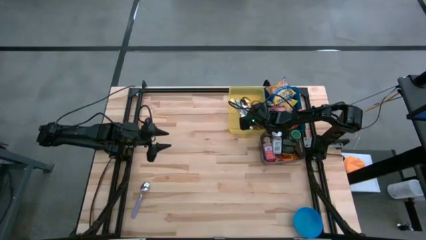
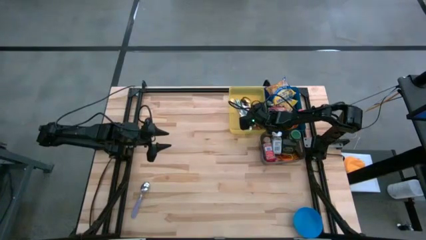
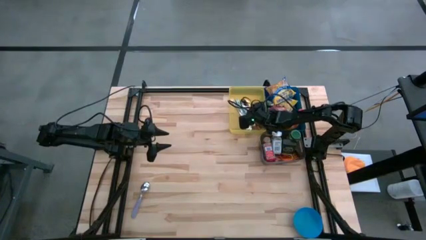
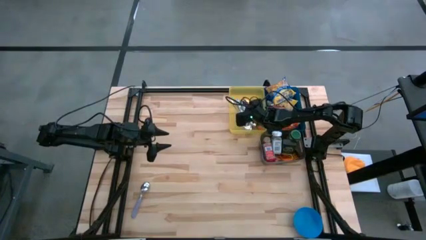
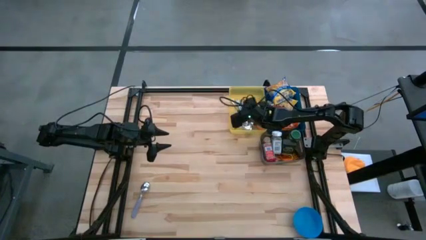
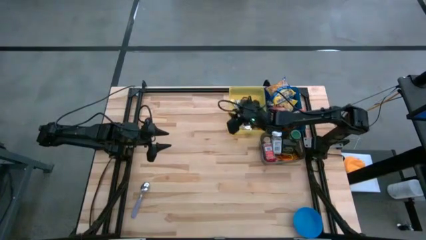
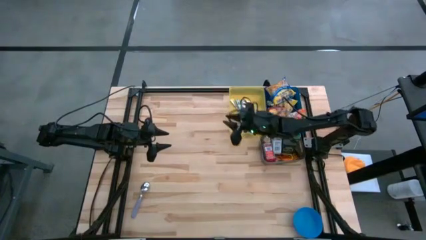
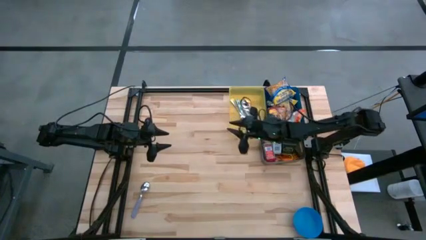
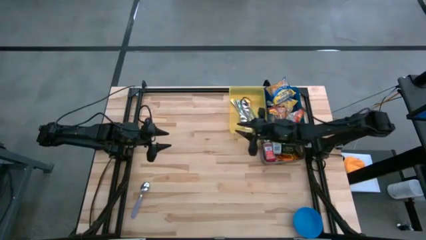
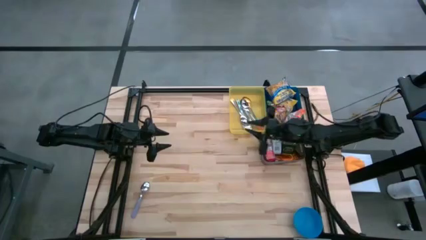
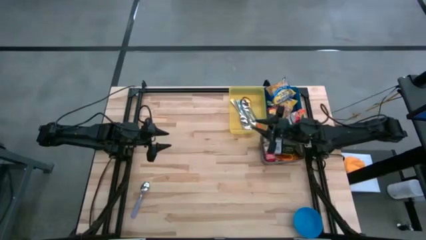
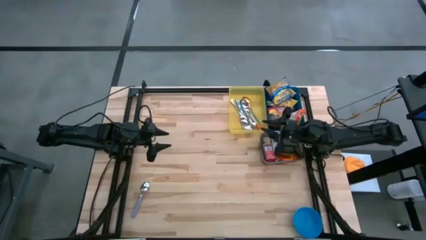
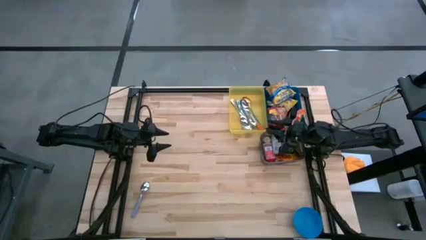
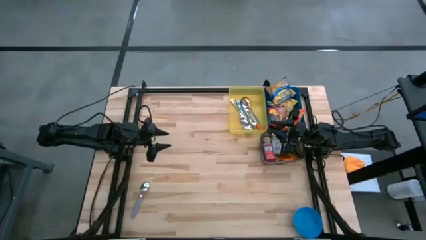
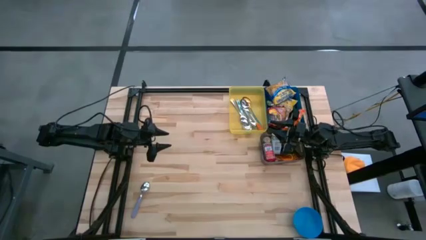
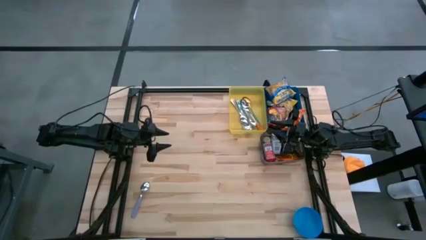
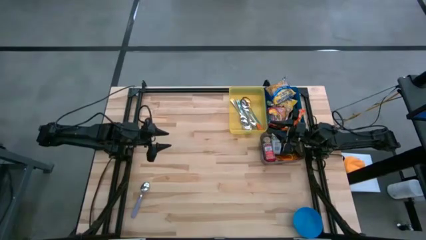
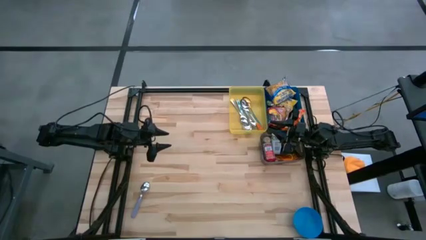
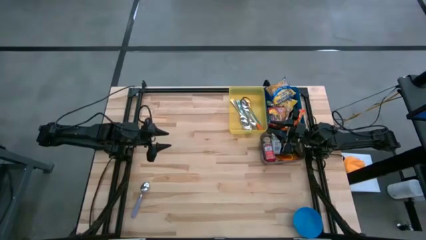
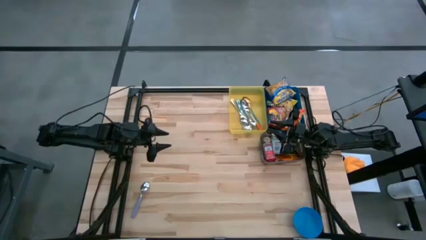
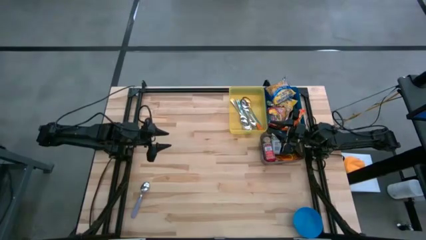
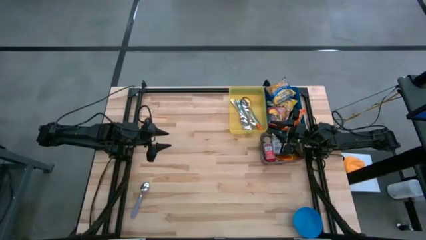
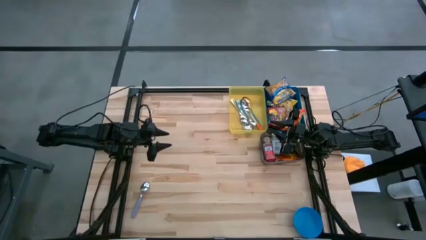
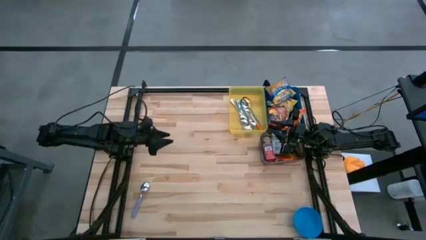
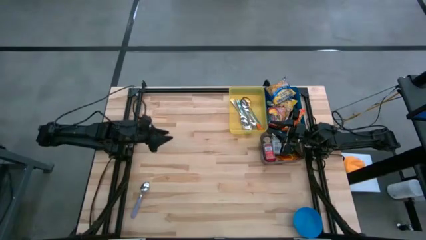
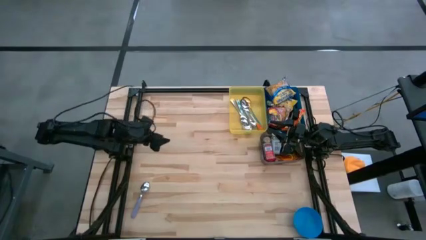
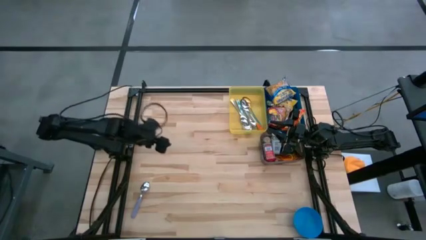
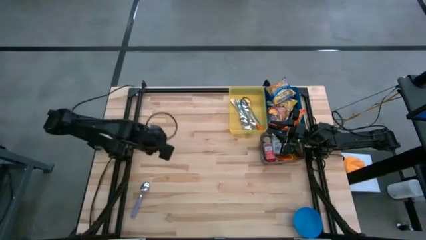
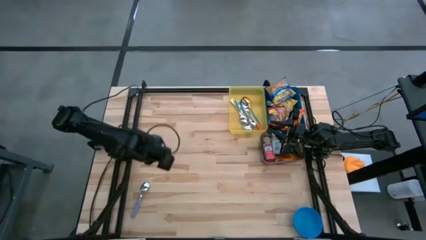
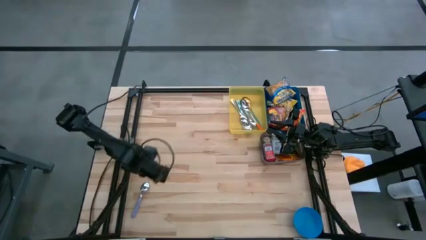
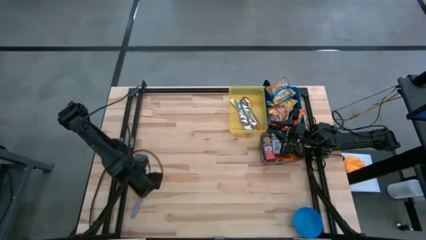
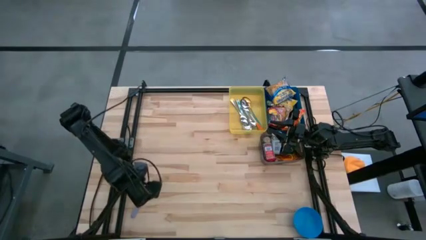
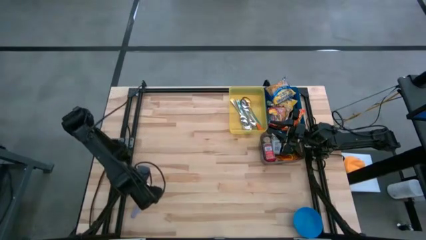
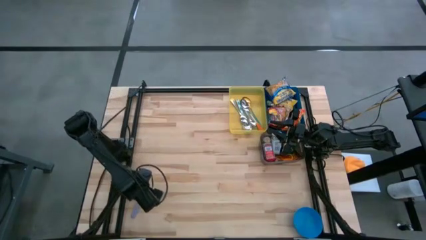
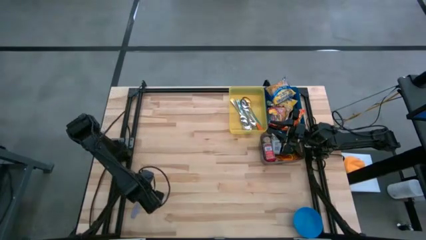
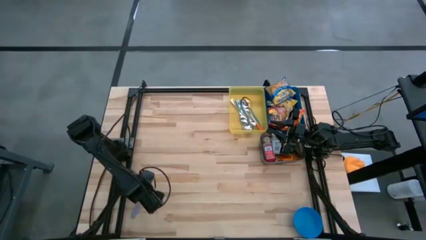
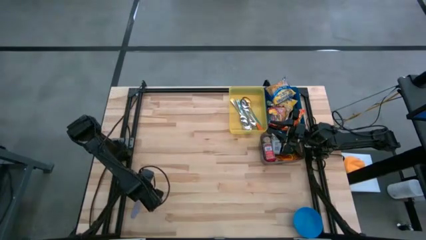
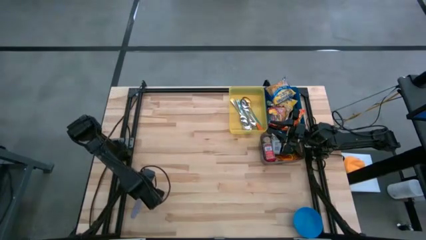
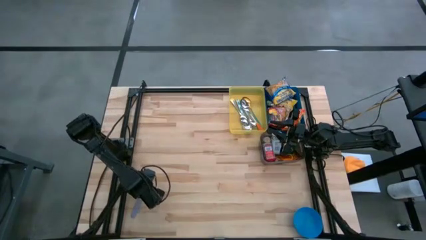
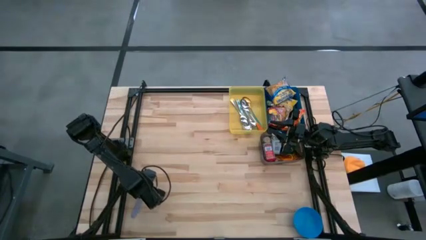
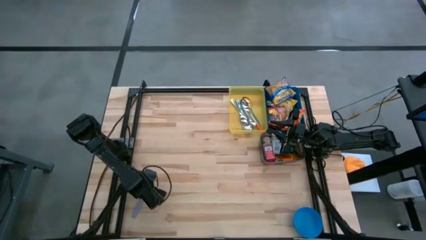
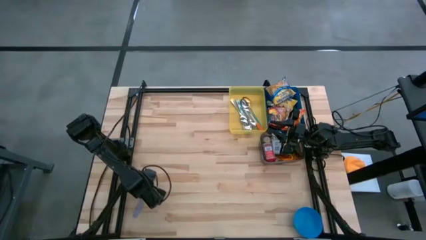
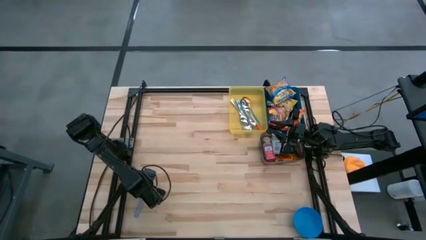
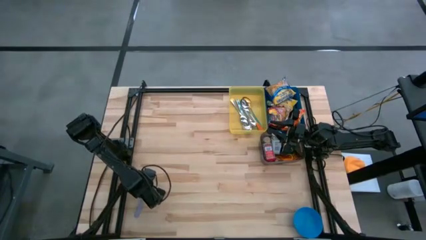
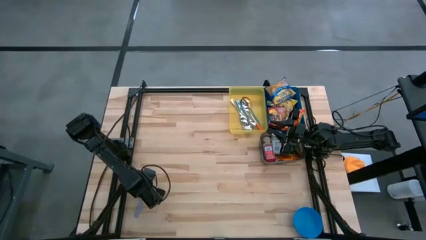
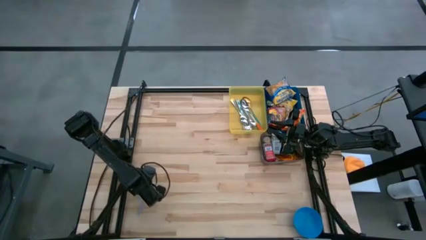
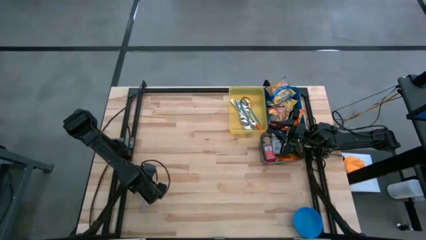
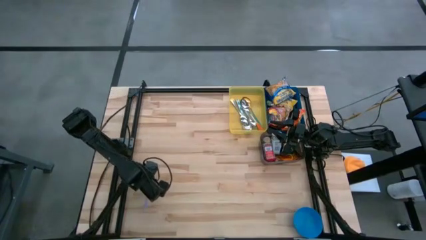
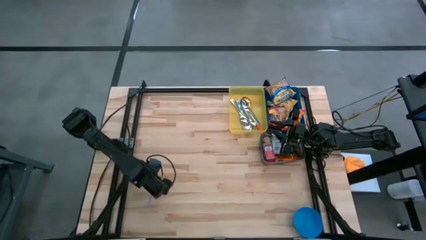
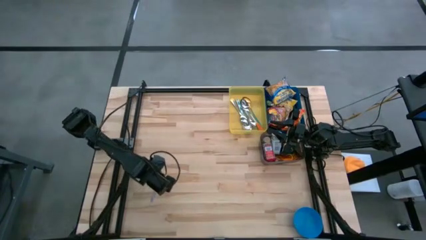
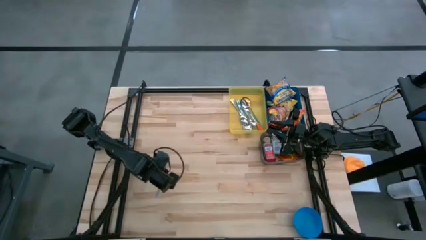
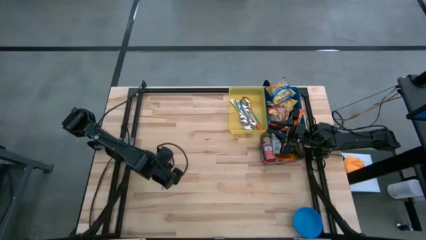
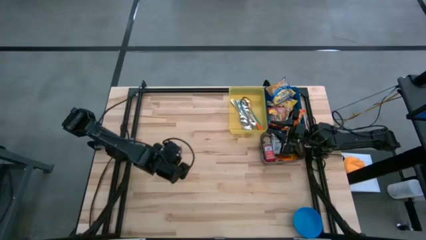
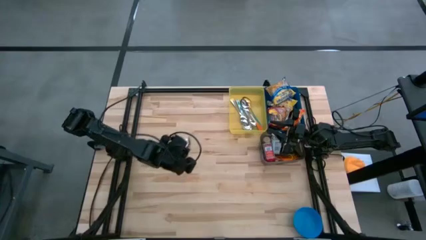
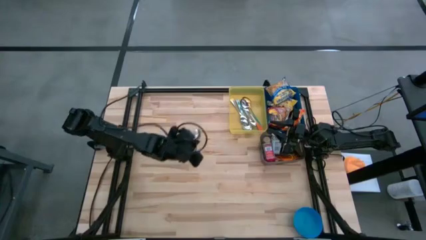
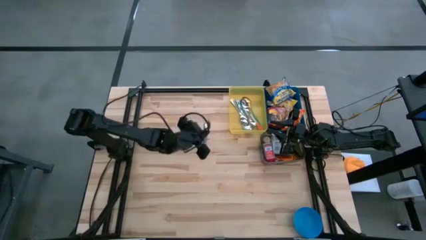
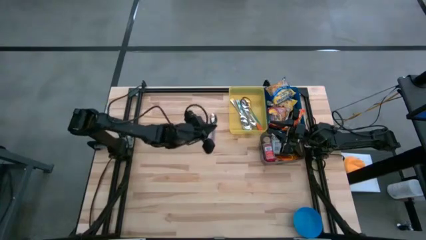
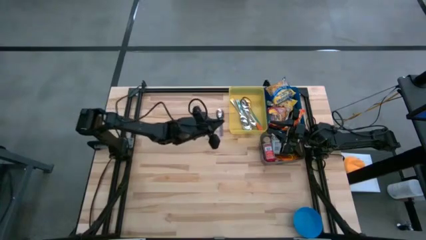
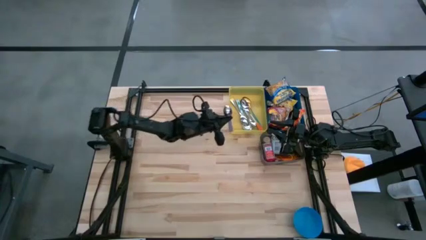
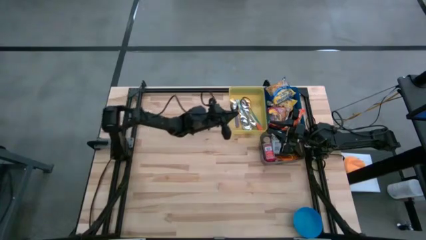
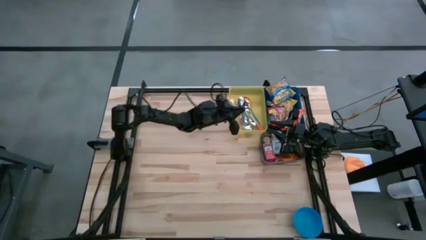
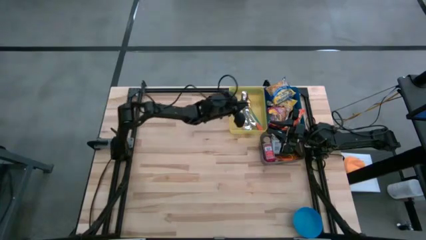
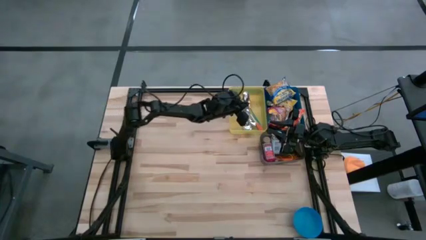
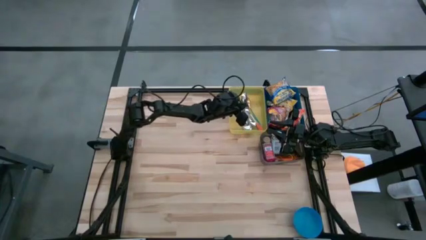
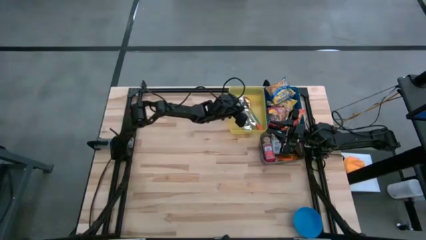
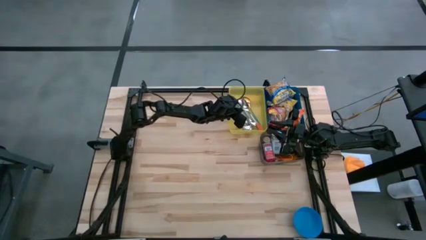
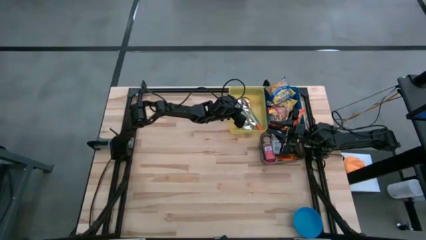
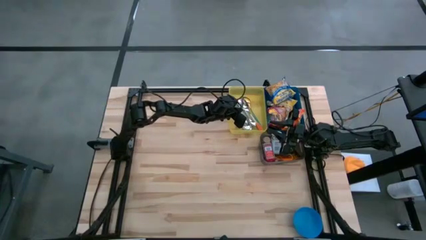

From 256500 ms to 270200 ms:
Put the violet spoon into the yellow bin
